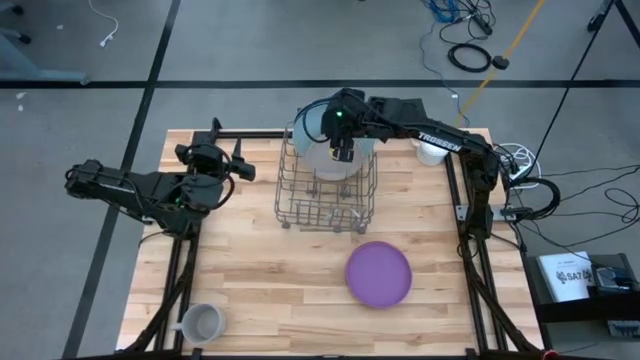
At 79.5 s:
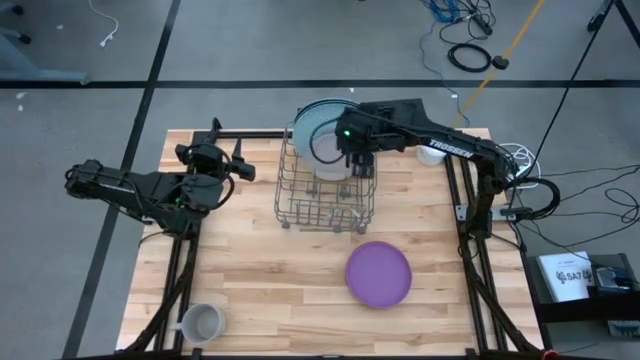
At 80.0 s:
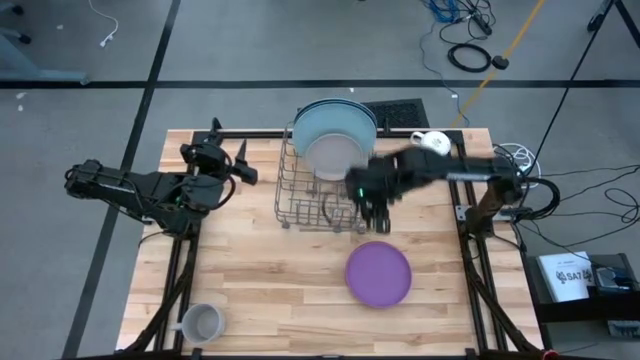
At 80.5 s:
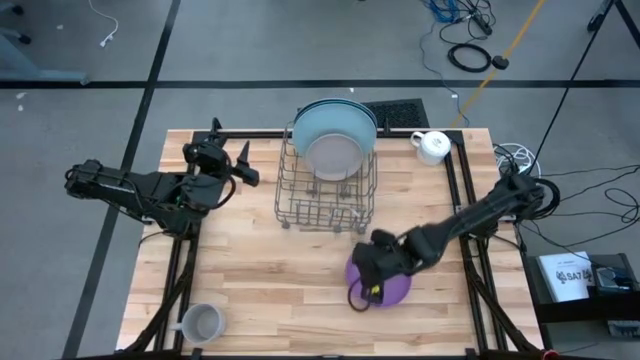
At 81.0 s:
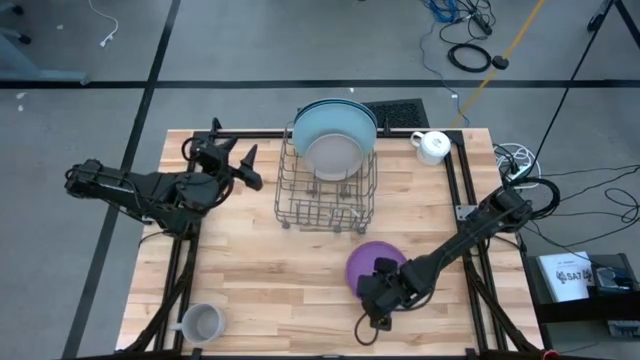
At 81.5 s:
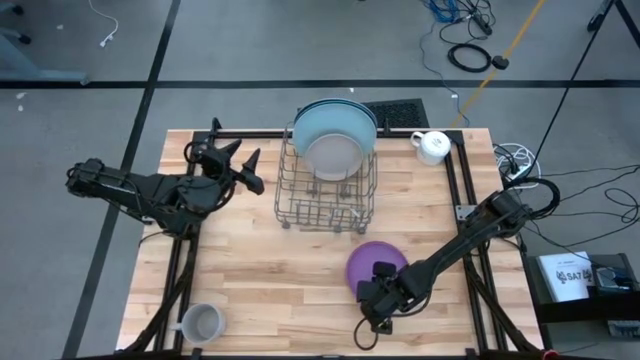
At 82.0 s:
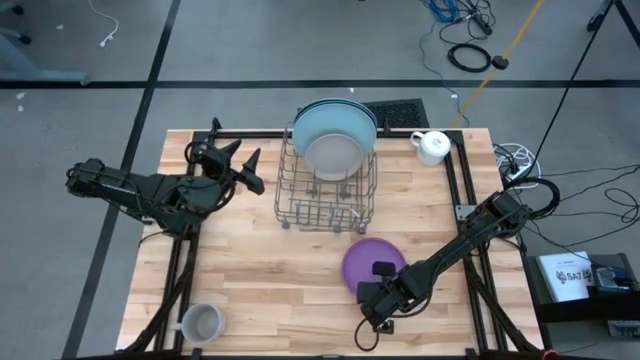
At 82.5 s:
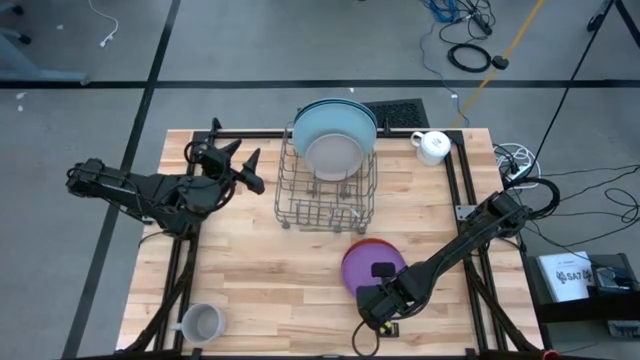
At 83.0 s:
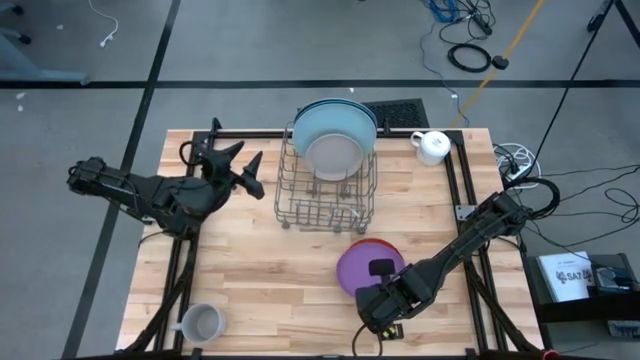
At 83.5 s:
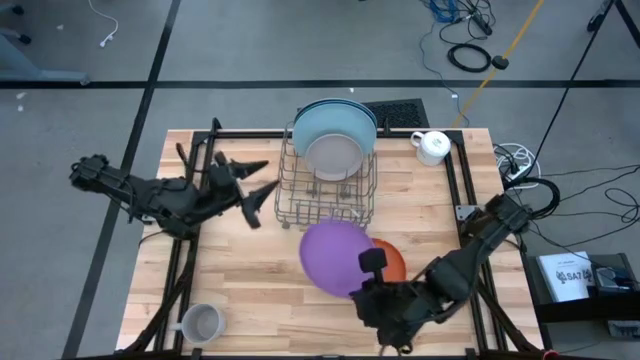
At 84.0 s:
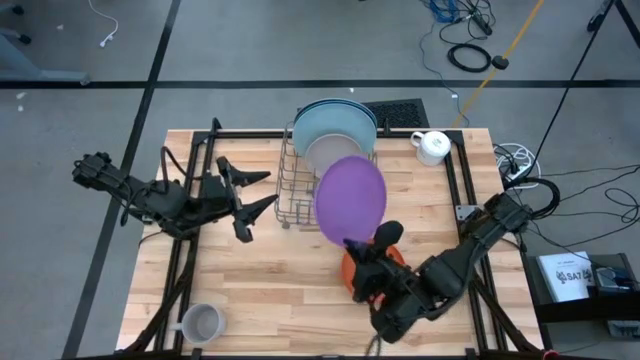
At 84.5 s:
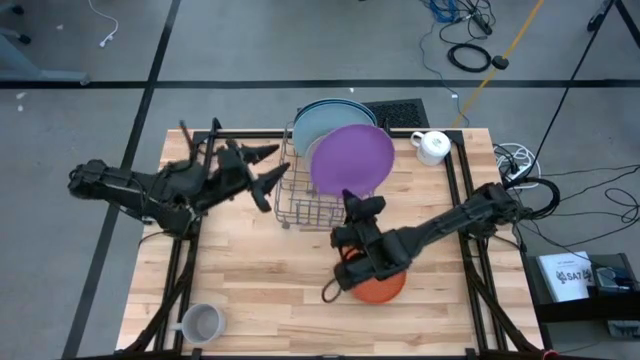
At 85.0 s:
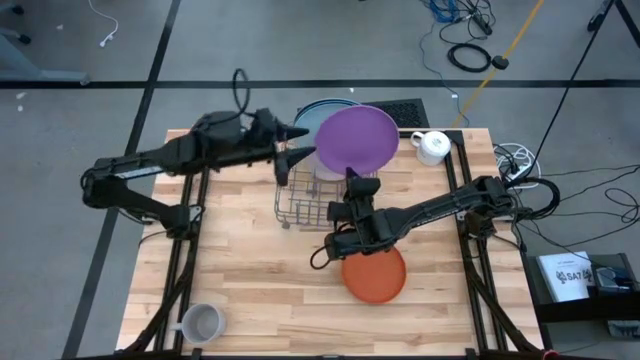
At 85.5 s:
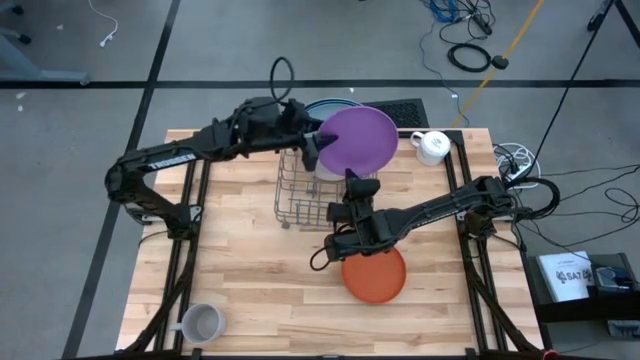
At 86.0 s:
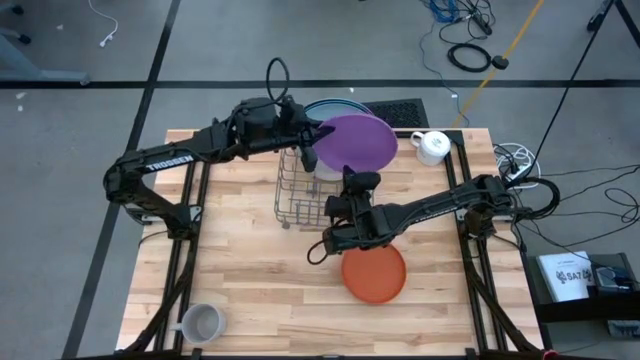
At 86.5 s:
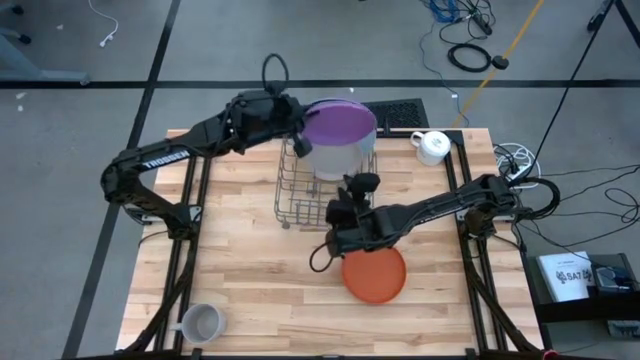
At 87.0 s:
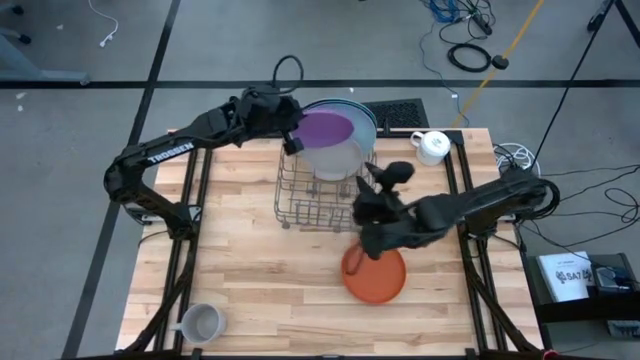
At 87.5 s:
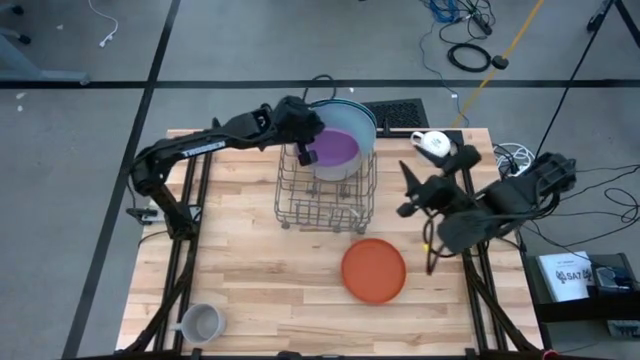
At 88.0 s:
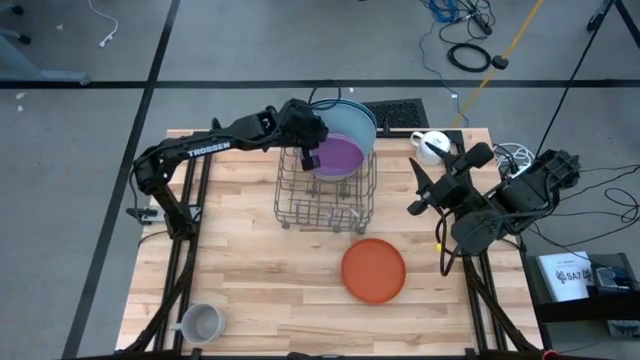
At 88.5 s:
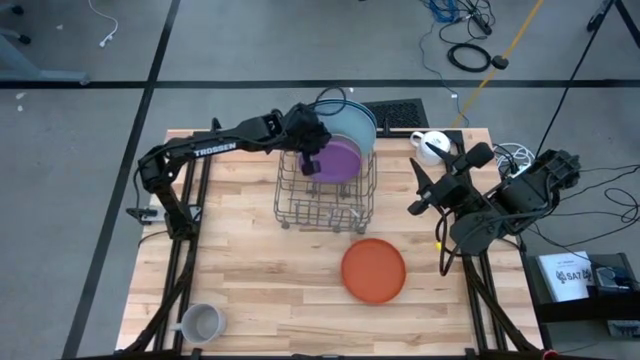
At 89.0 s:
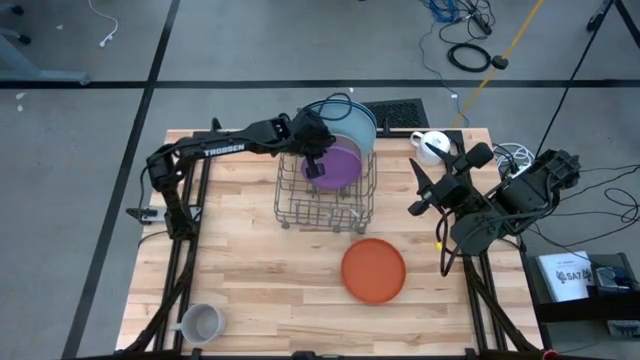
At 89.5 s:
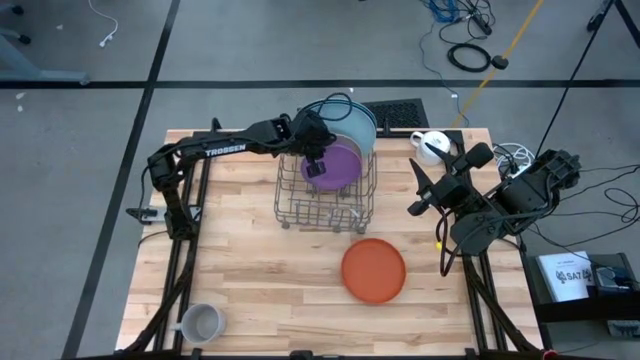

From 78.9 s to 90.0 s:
Task: Sort dishes
Put the purple plate into the dish rack

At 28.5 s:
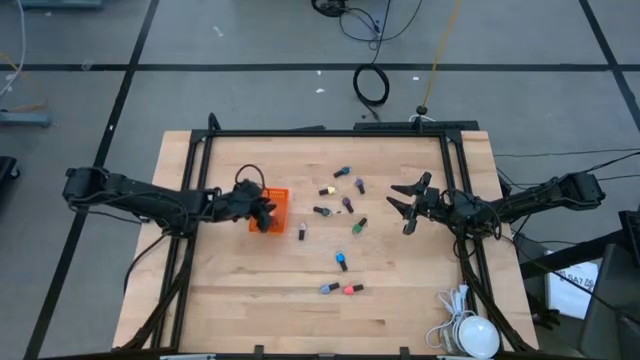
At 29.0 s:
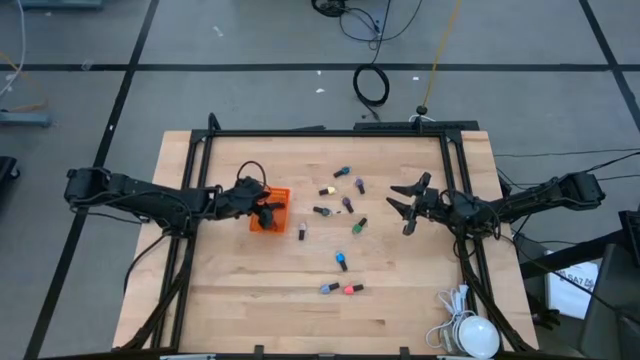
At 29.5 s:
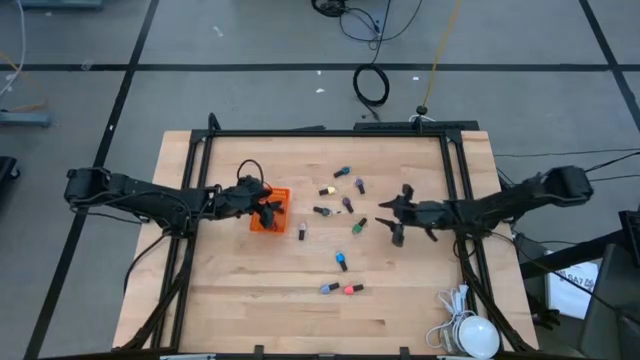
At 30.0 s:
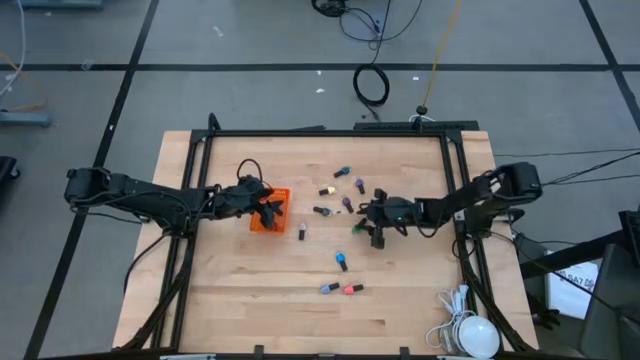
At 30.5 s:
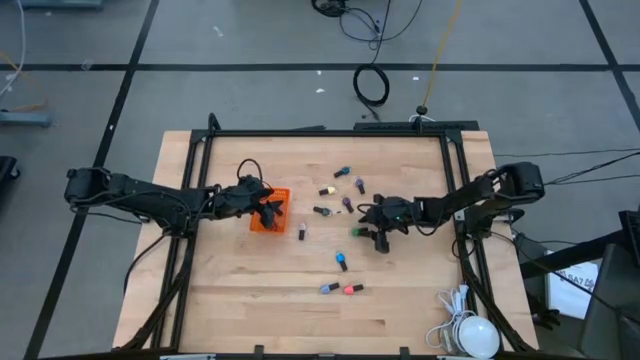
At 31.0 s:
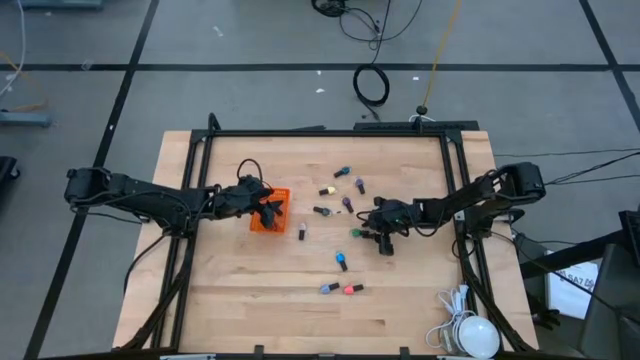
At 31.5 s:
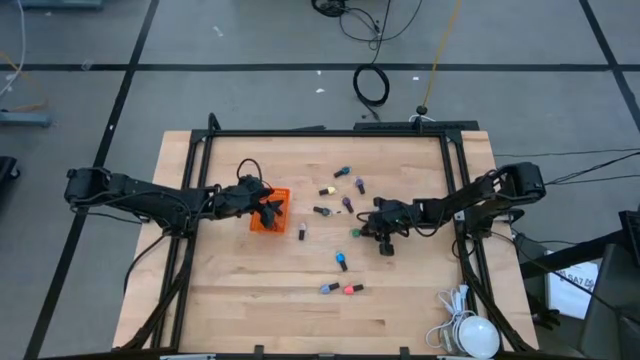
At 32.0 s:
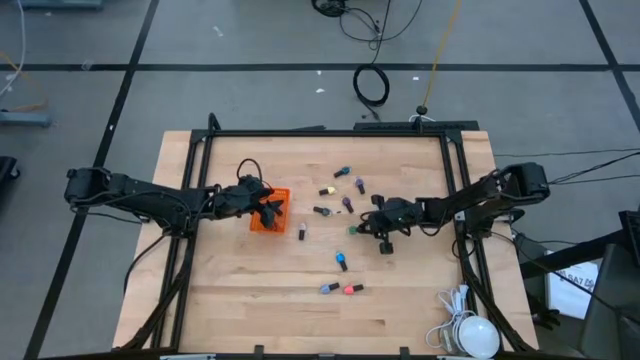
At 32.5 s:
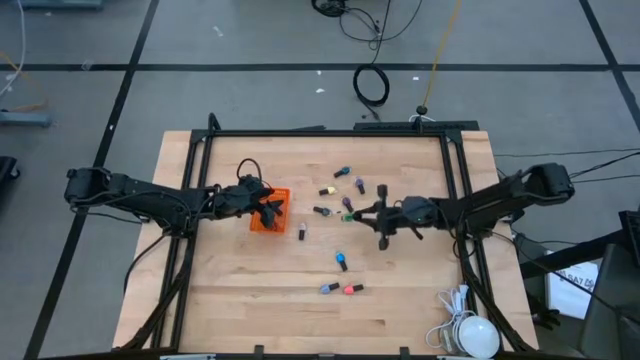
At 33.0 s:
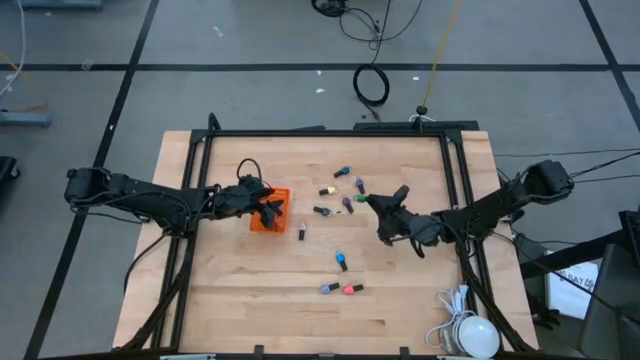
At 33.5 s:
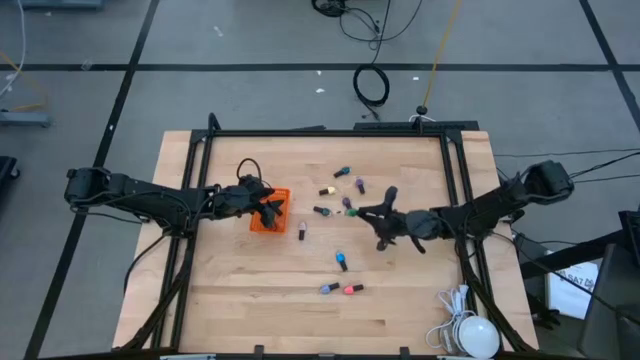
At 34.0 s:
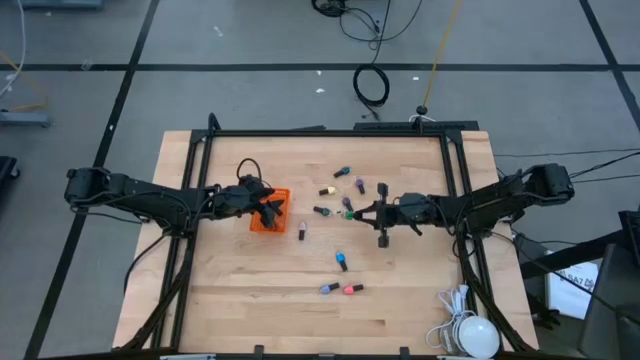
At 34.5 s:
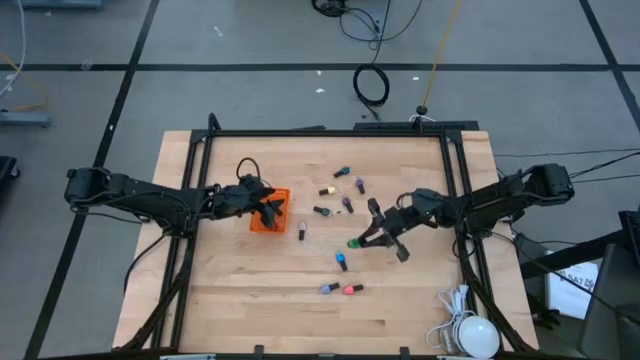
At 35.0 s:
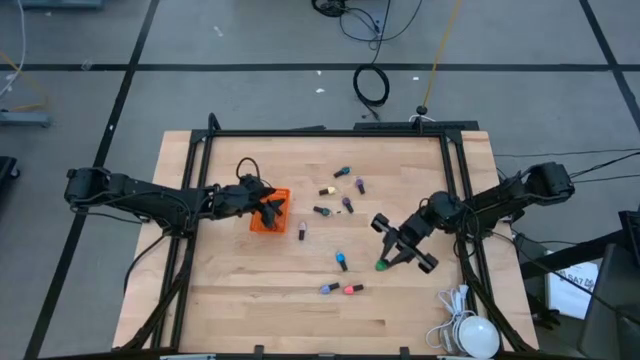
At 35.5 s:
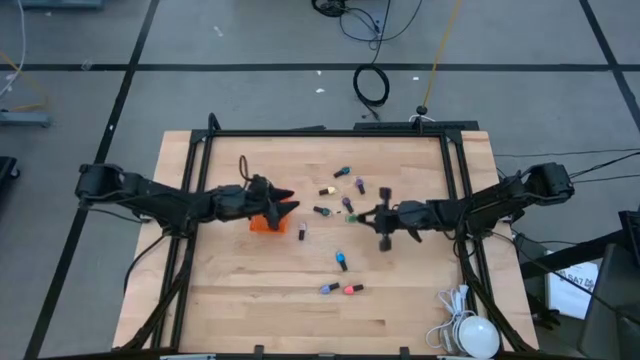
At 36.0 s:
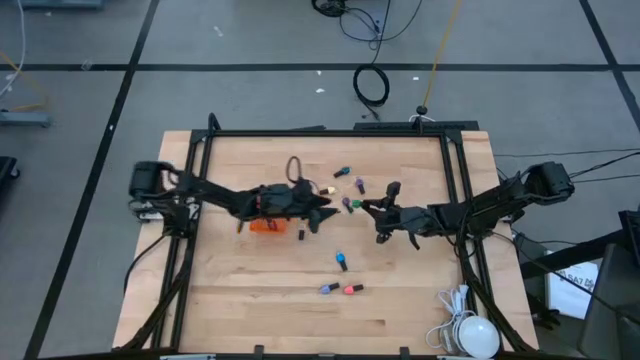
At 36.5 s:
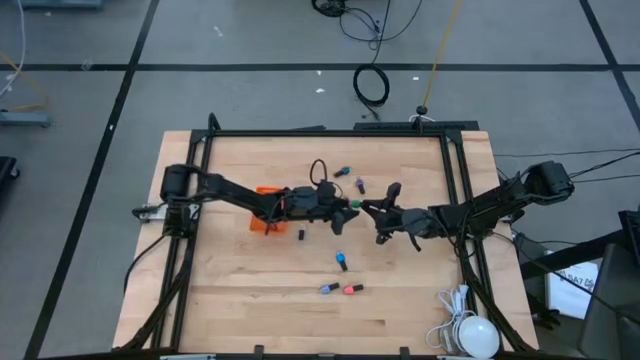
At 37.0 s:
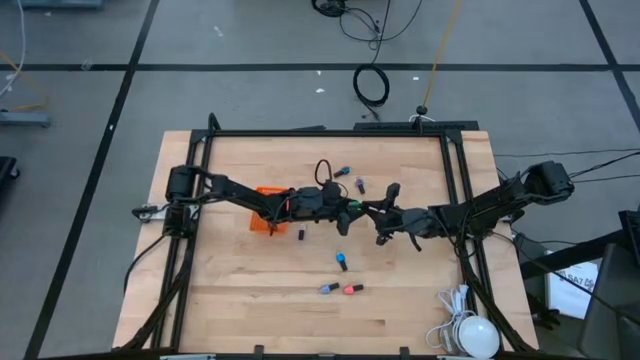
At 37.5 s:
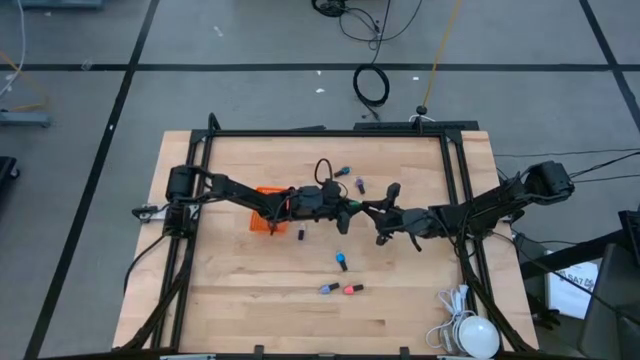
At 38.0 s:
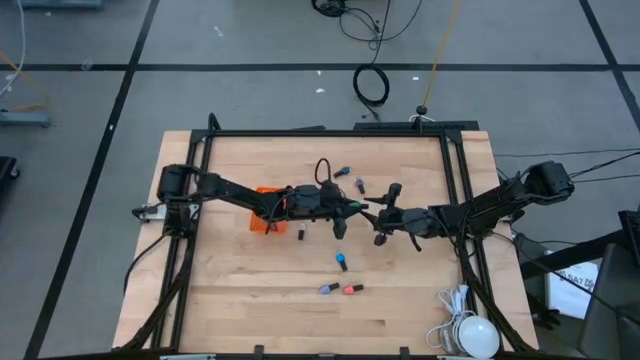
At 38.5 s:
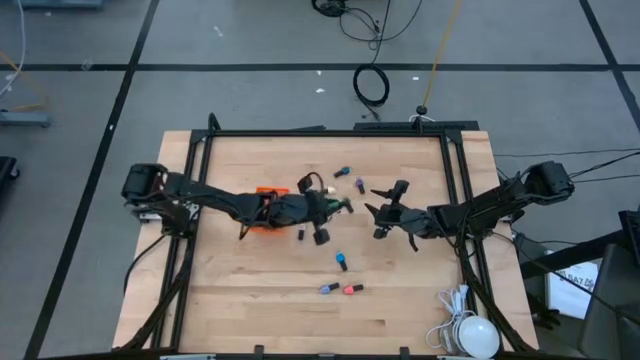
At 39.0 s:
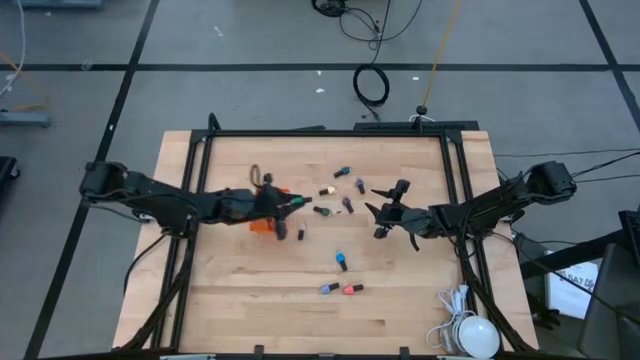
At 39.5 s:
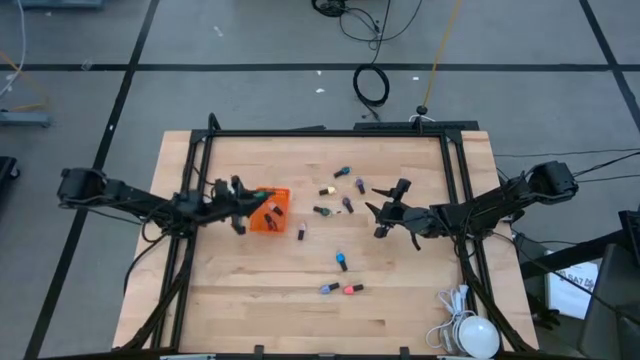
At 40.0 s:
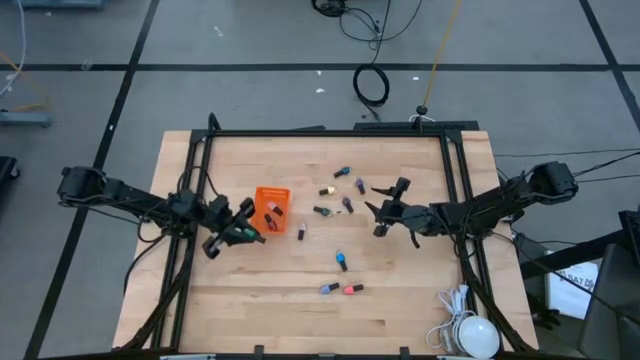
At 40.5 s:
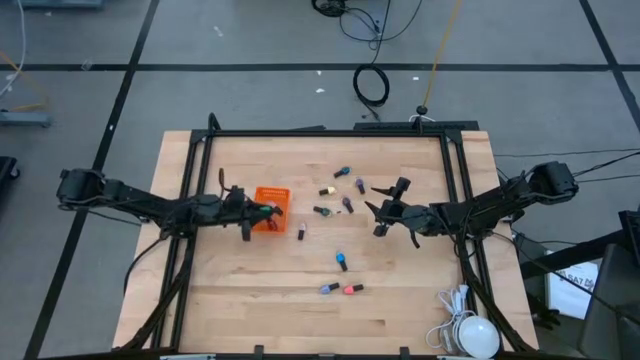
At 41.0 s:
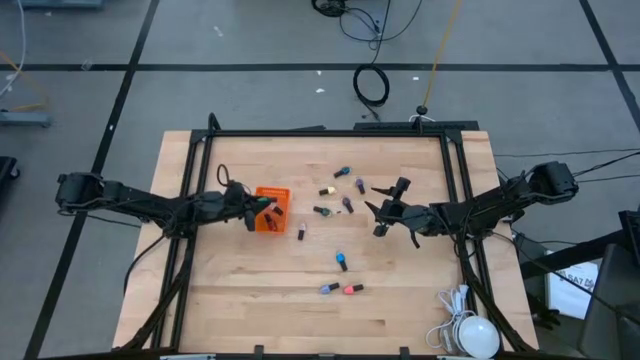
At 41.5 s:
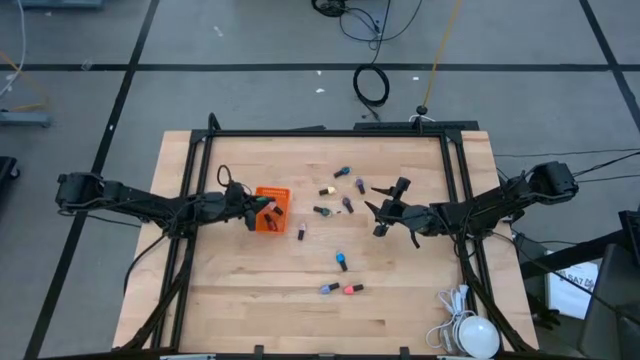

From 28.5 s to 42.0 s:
Task: Pick & Place Nail Polish
Put the green nail polish into the orange basket
